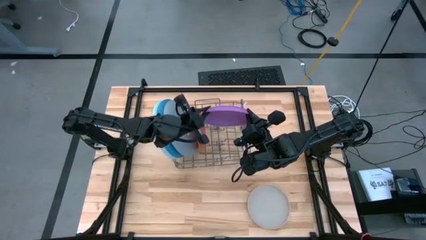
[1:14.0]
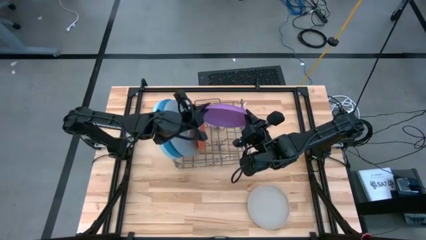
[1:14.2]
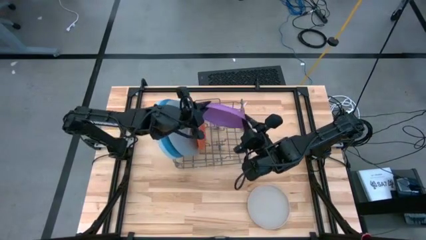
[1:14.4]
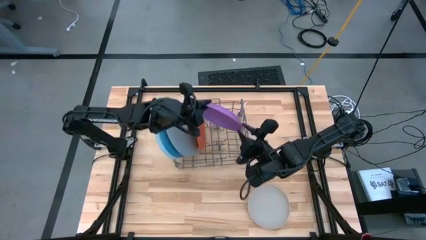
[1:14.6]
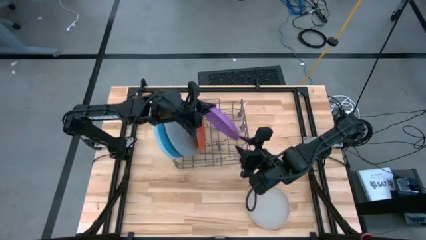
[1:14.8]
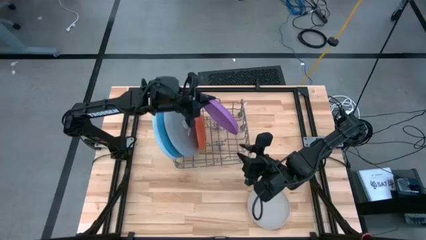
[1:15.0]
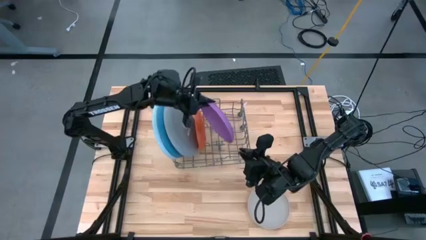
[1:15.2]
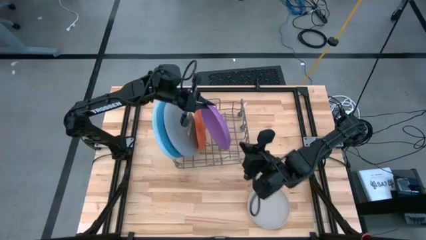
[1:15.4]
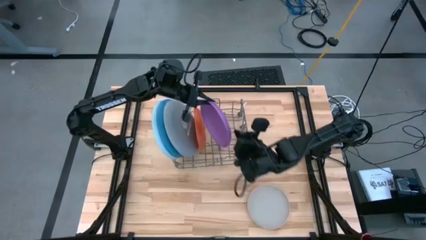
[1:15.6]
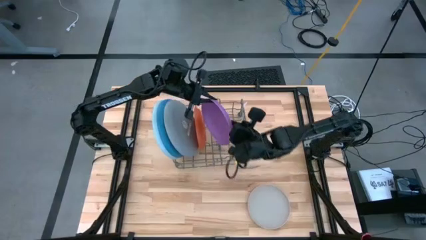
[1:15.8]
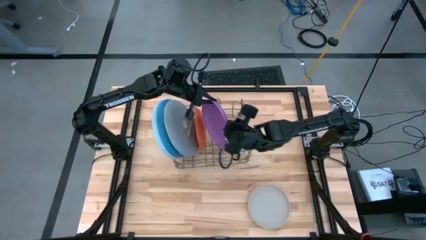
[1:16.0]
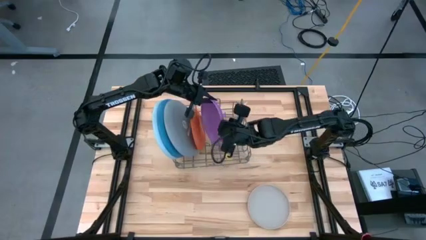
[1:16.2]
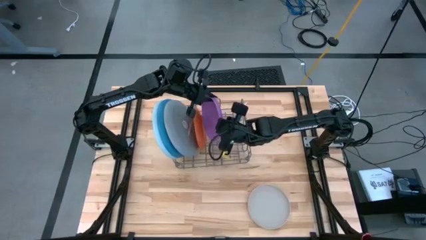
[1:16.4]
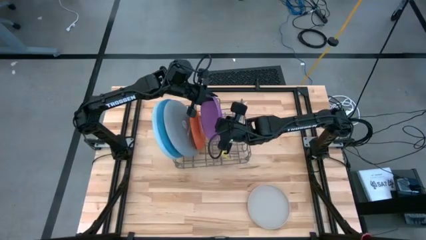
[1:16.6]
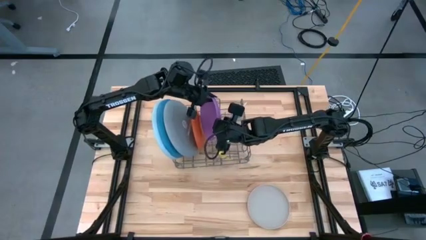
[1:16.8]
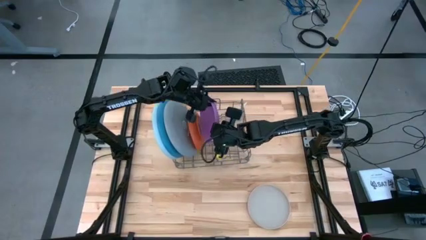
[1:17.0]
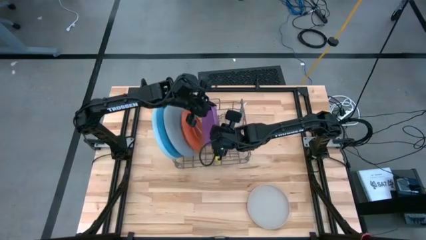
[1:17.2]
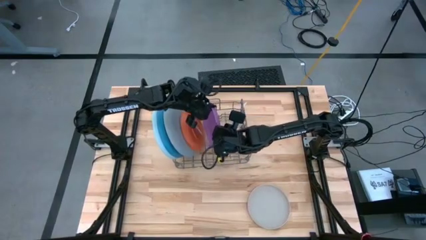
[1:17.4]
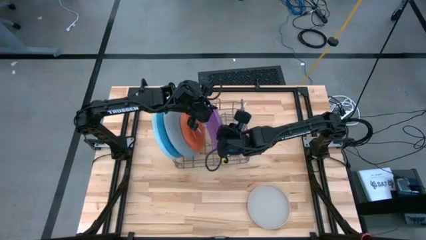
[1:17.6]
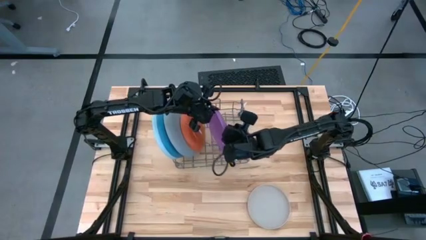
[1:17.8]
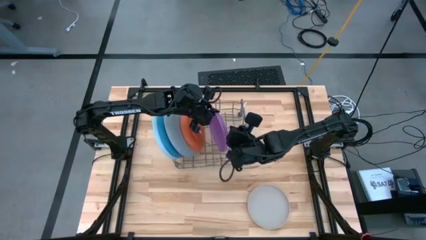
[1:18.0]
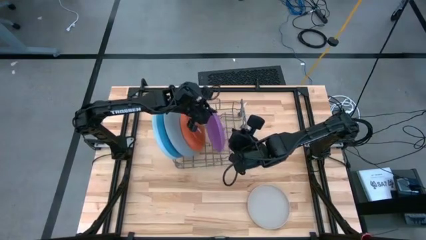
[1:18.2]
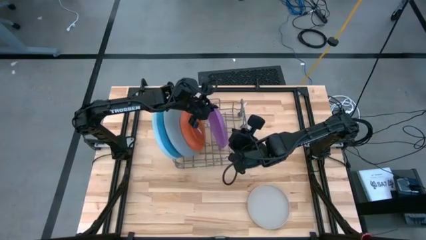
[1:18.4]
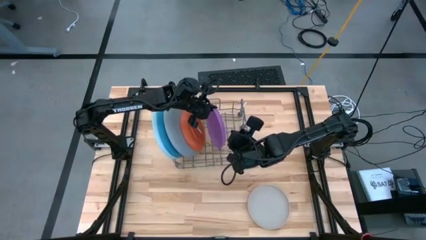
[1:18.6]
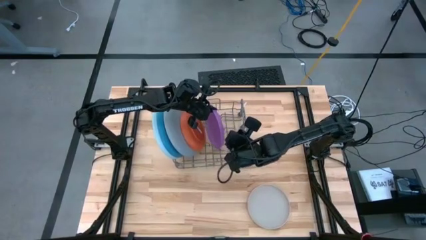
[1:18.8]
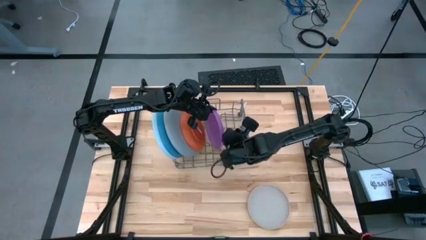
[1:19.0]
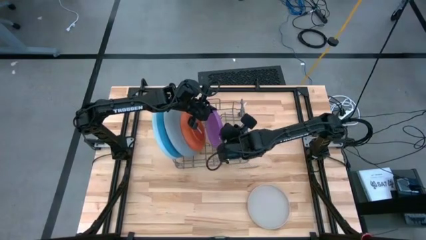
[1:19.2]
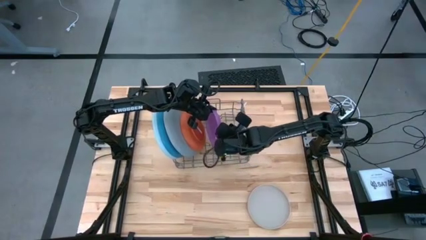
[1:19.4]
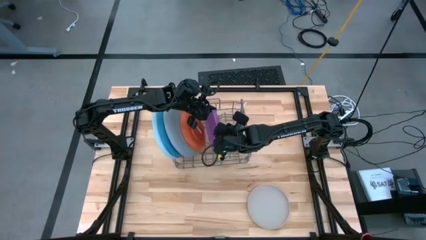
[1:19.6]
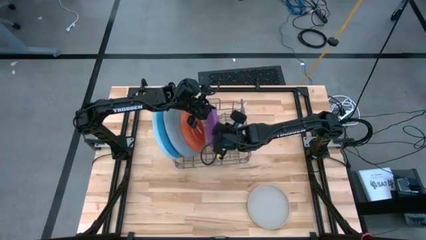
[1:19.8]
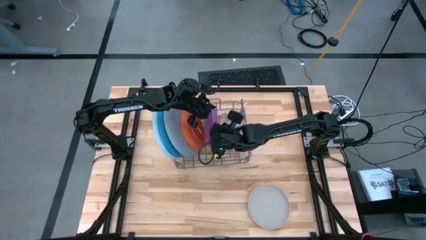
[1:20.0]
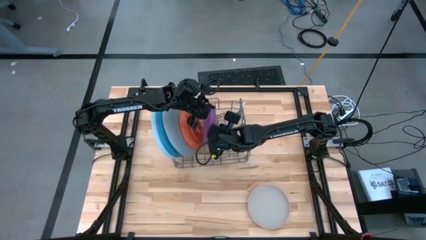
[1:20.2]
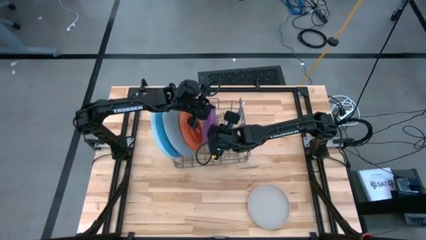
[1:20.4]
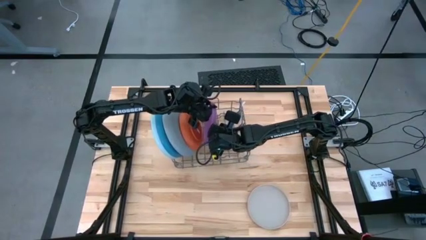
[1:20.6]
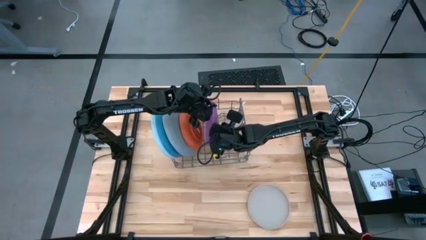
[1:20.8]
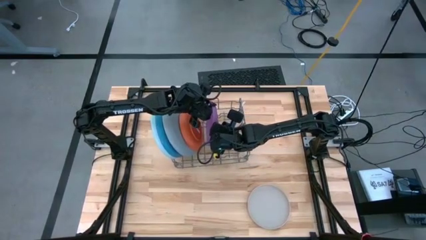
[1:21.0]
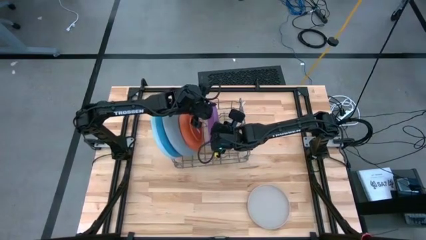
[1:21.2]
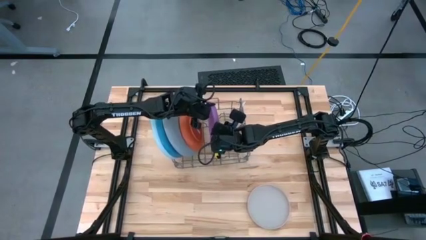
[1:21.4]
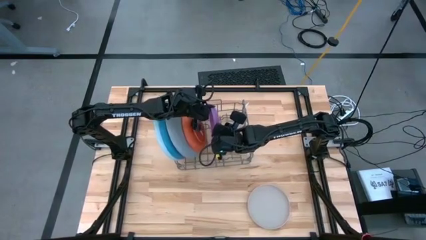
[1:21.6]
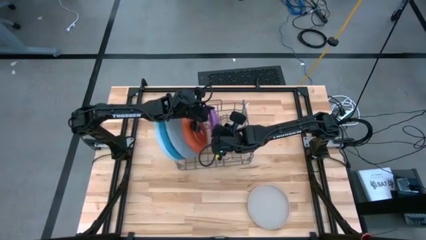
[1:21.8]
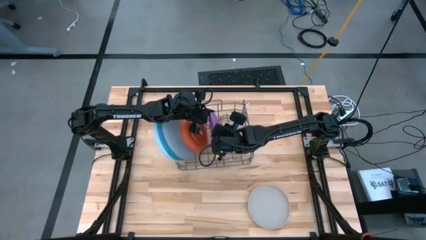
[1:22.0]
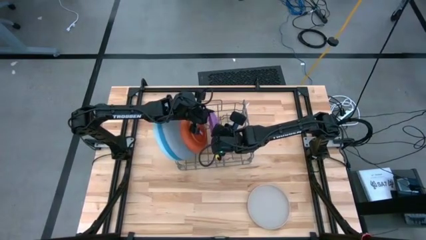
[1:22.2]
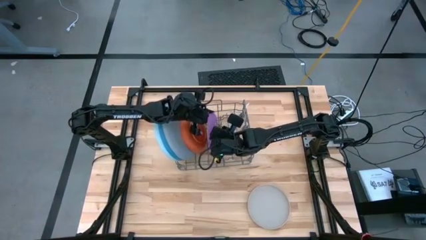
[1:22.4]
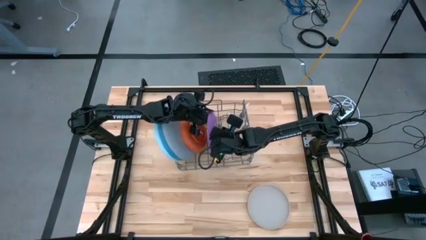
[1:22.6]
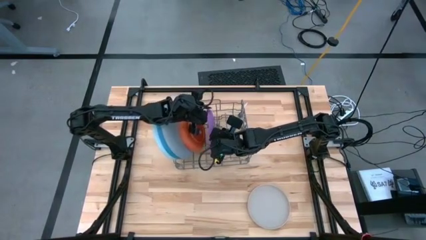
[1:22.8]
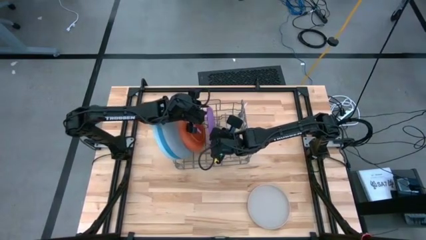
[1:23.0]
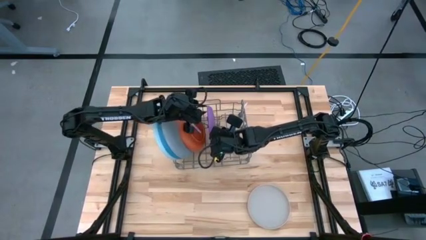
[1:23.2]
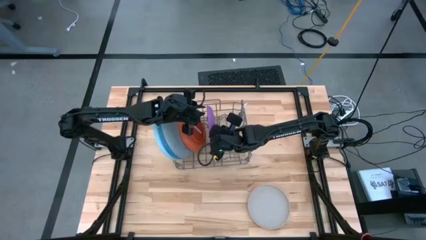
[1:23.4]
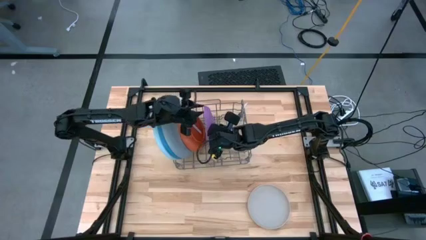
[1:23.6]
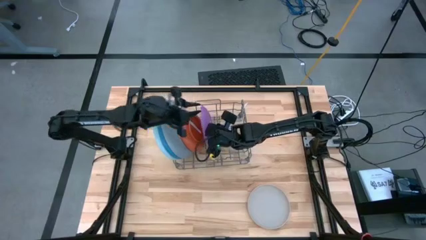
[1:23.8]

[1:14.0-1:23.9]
Task: Sort dishes
Put the purple plate in the dish rack
